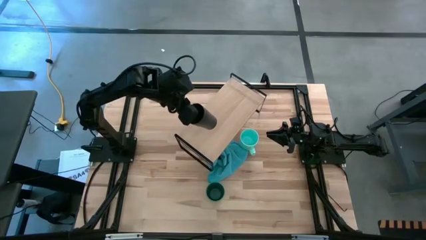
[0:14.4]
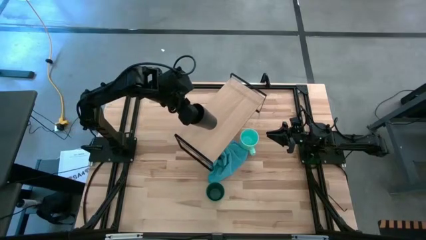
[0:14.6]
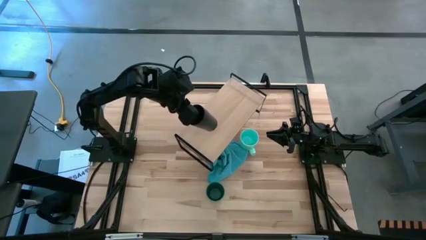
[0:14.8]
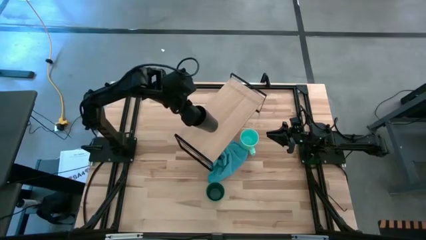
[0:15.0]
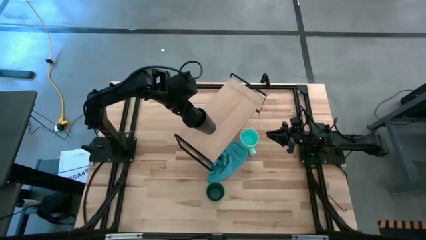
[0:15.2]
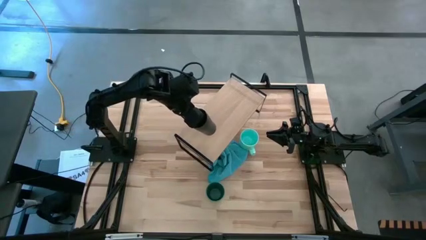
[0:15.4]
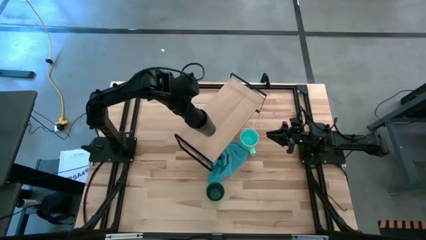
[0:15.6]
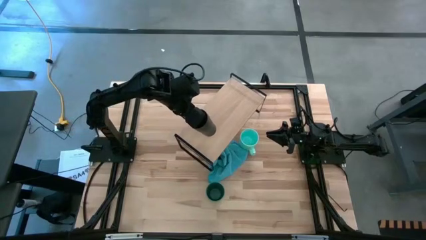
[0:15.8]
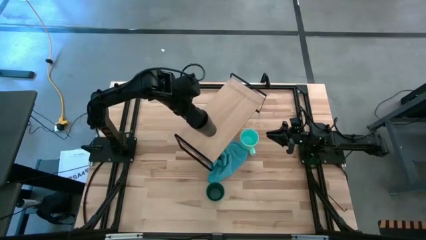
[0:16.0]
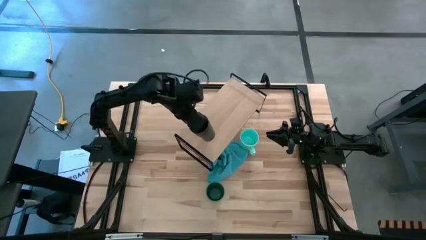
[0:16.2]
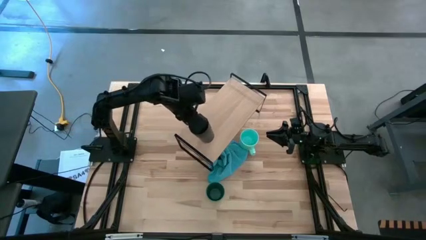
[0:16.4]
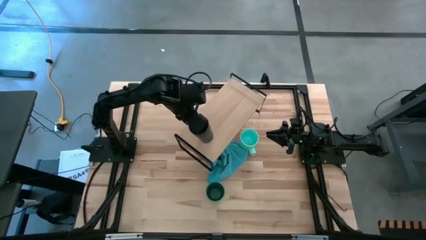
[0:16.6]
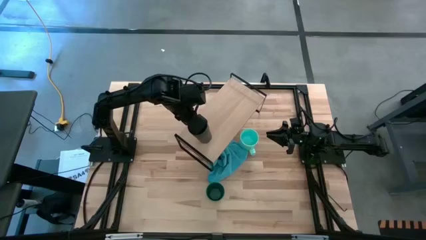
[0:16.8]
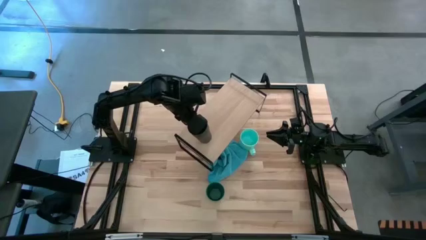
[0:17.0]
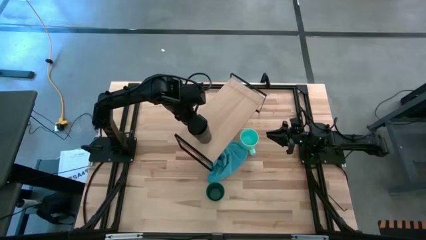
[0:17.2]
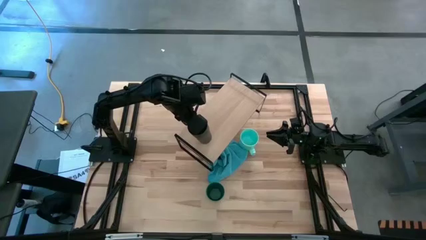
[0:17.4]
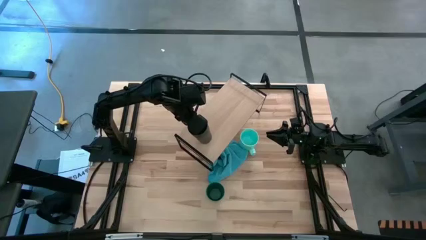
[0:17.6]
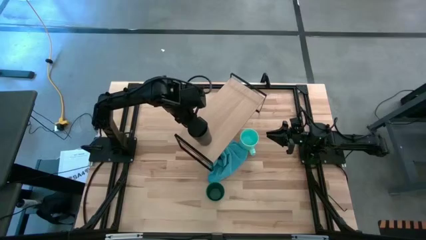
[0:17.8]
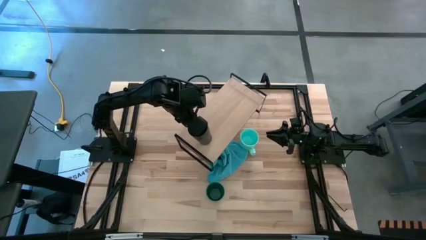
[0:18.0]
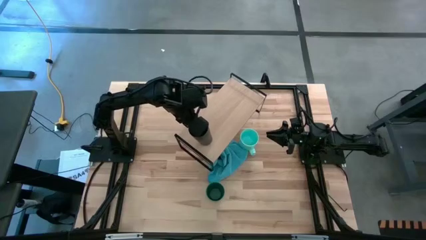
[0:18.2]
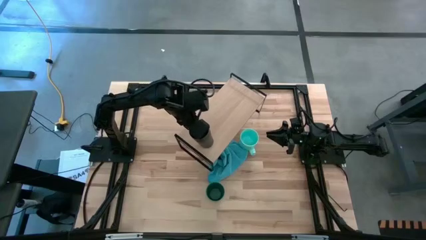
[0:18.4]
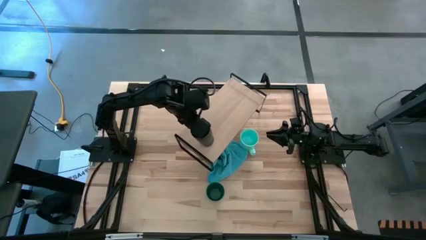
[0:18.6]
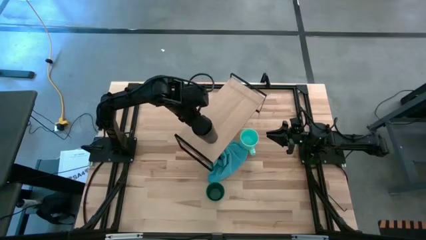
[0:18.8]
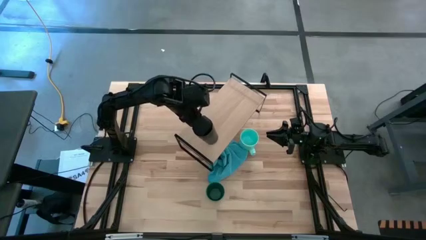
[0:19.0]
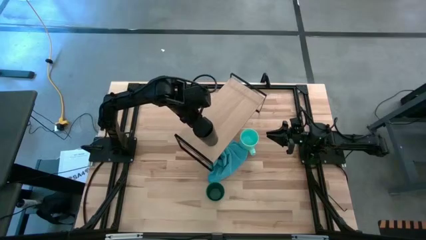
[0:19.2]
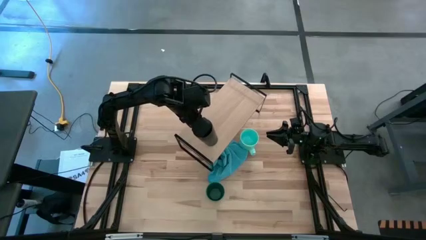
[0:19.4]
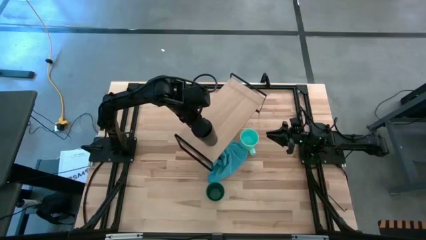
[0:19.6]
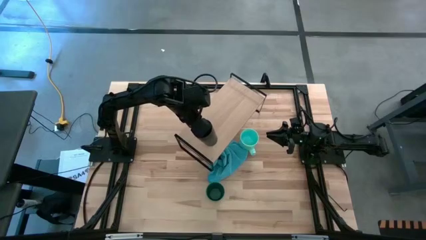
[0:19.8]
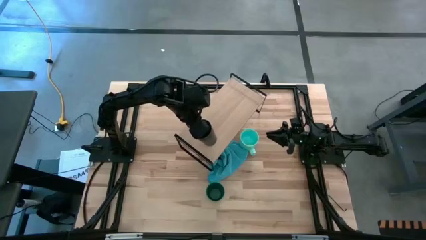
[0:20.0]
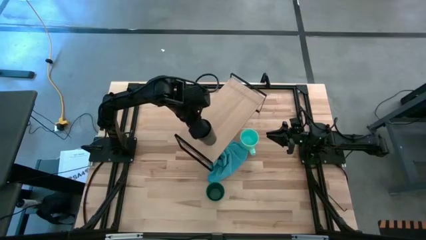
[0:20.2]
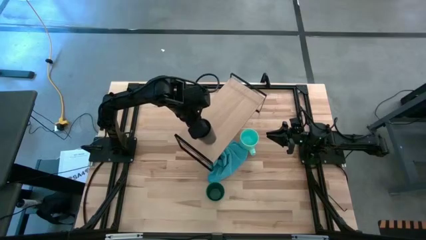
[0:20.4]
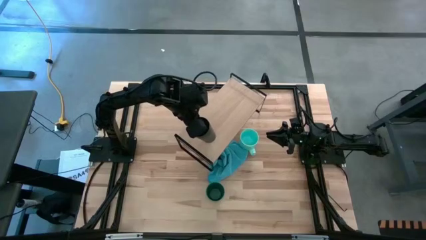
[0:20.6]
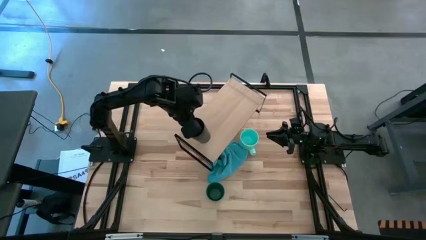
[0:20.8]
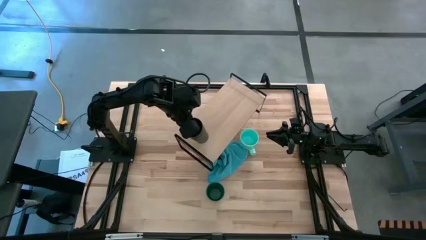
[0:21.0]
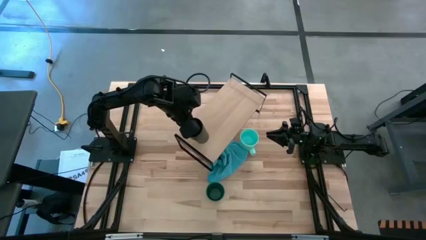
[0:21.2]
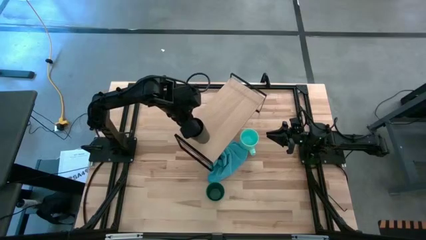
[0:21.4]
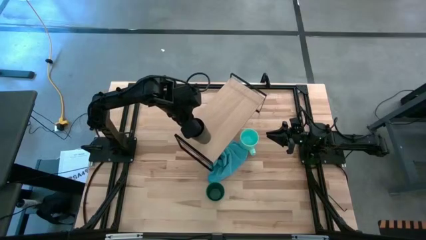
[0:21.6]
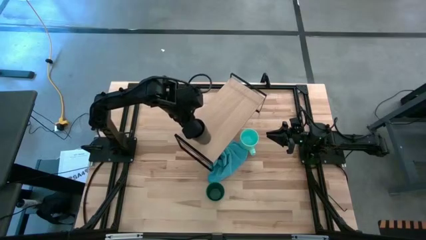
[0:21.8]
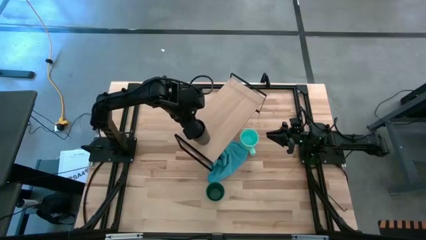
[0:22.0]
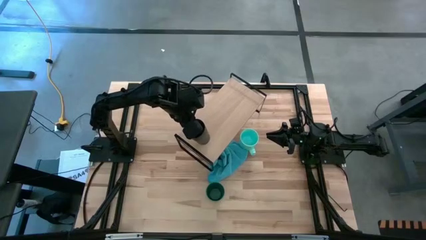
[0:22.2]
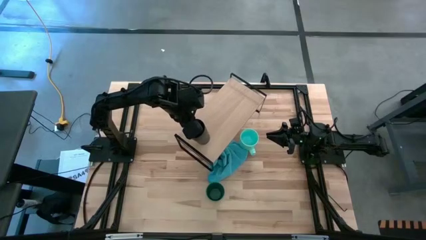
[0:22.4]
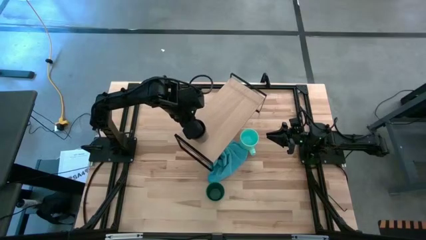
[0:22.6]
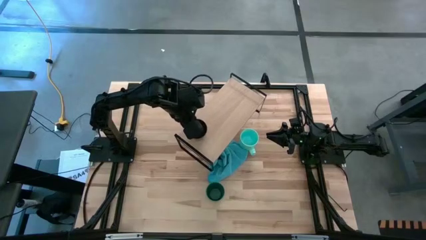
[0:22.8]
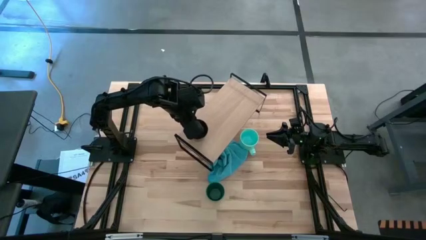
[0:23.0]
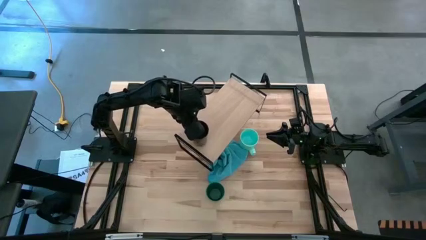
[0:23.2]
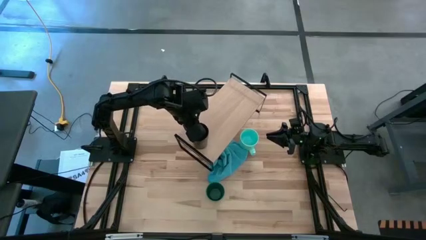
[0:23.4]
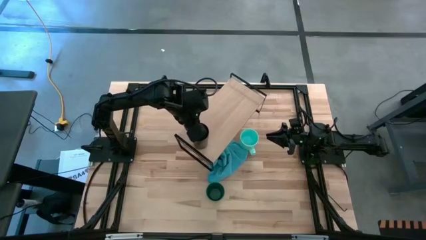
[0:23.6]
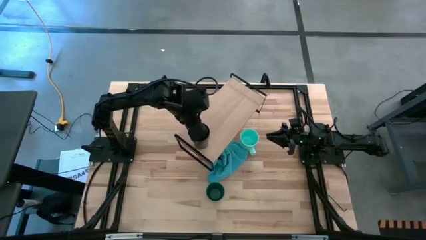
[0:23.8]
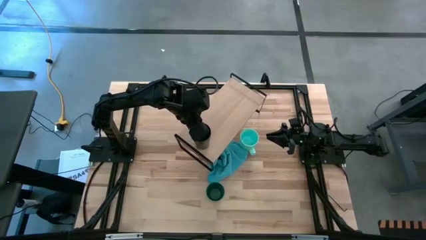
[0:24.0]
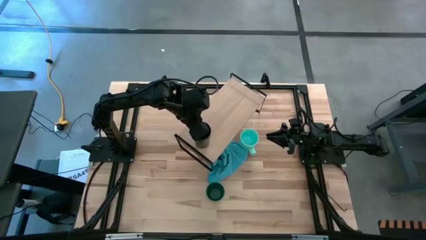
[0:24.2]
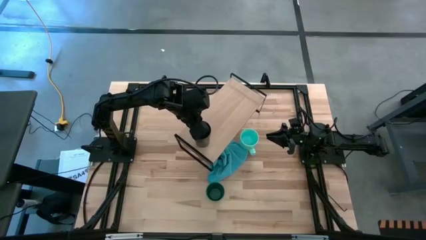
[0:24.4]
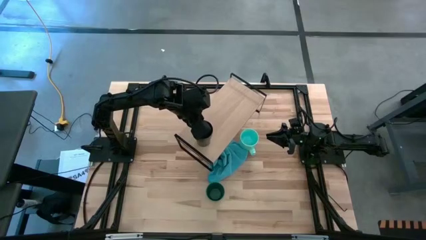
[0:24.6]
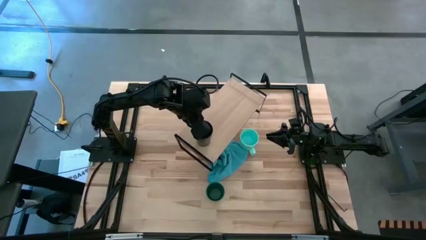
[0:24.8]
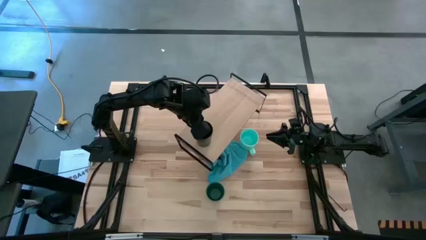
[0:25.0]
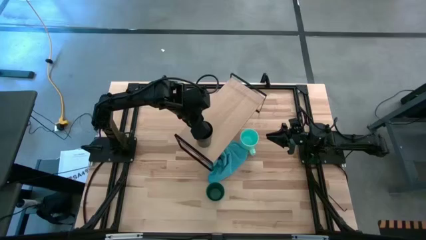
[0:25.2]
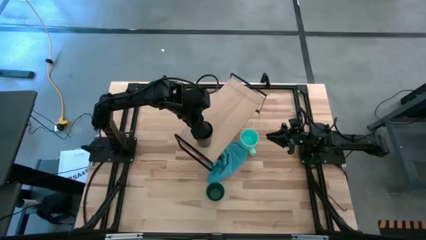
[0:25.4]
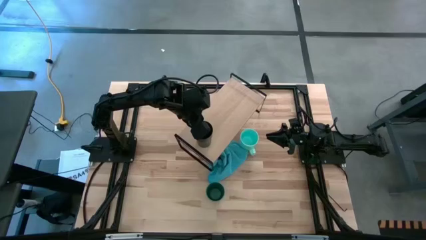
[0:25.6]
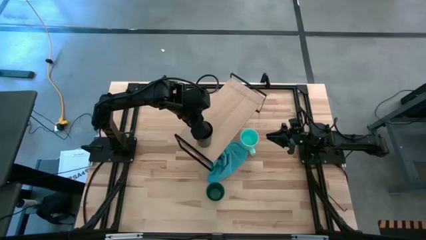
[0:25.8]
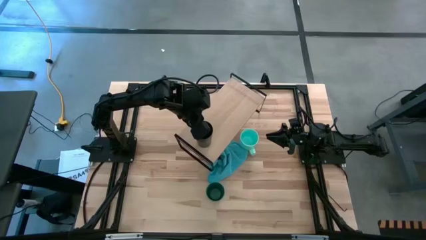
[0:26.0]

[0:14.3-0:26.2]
Task: Stack small to large cups/mugs on shelf
Put the black cup on the shelf

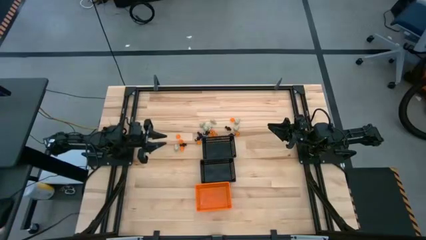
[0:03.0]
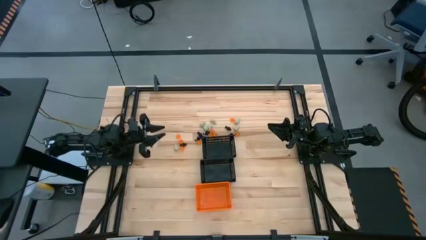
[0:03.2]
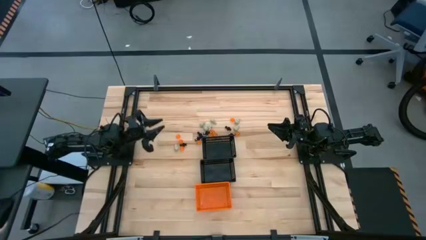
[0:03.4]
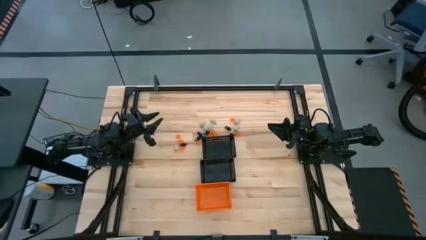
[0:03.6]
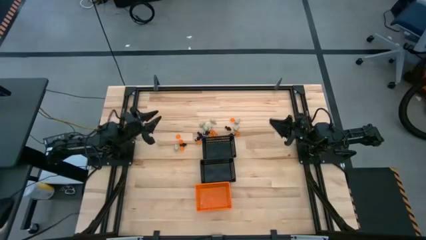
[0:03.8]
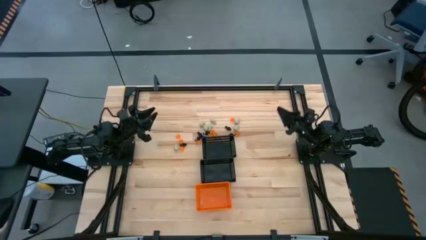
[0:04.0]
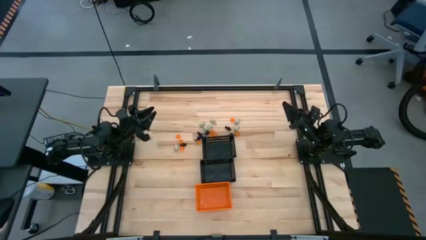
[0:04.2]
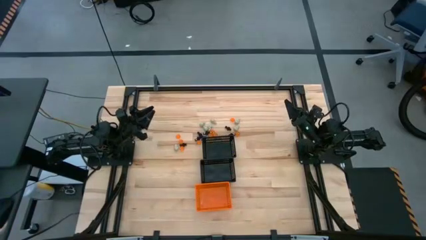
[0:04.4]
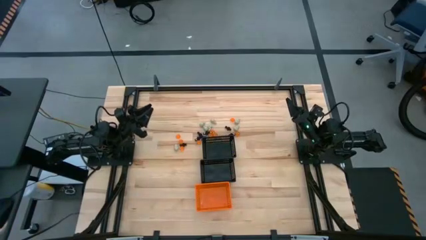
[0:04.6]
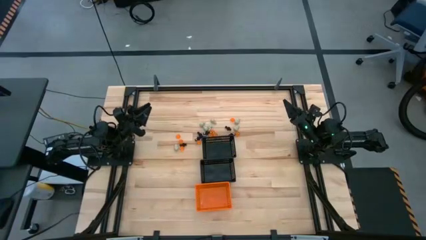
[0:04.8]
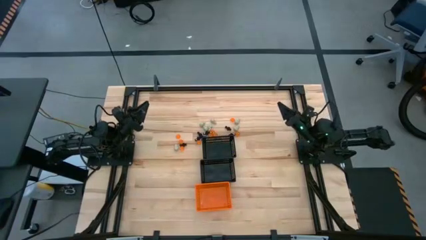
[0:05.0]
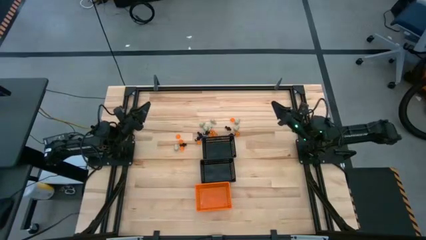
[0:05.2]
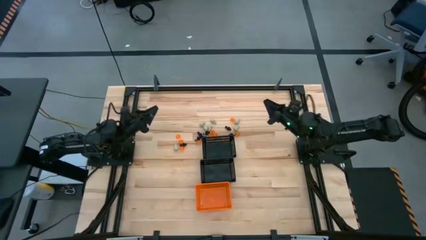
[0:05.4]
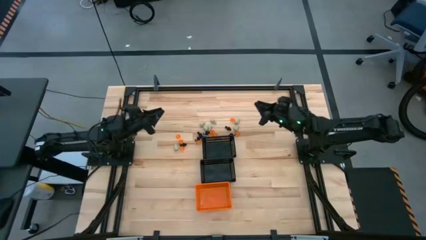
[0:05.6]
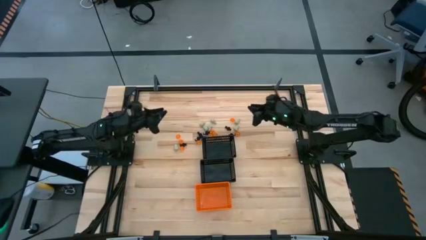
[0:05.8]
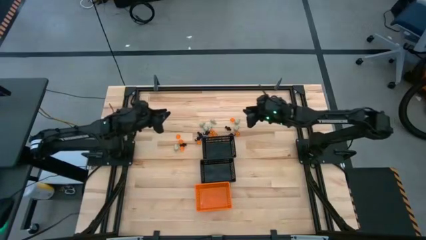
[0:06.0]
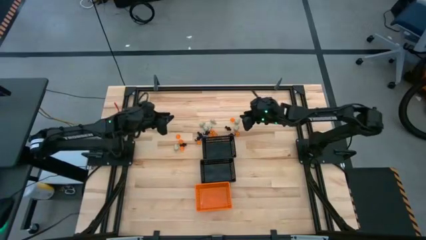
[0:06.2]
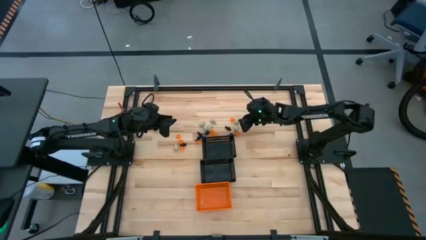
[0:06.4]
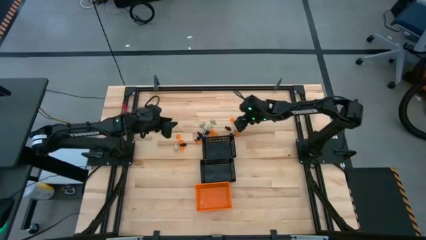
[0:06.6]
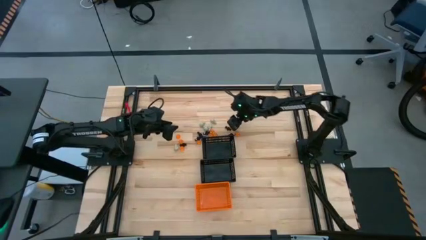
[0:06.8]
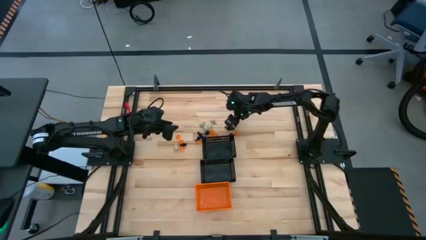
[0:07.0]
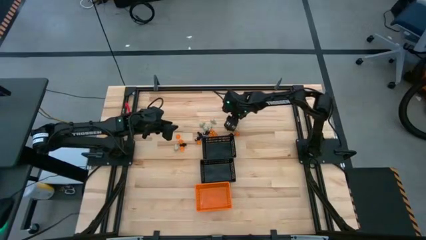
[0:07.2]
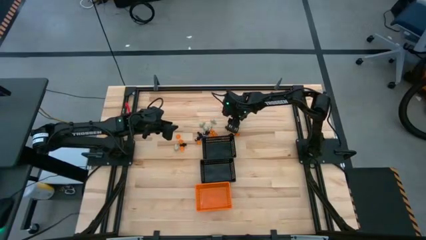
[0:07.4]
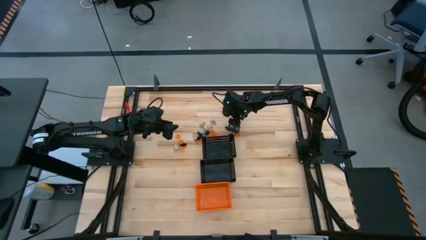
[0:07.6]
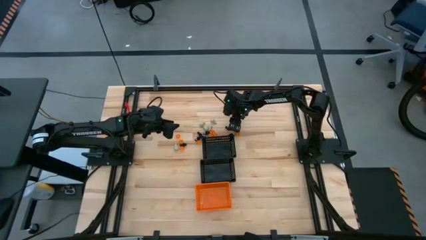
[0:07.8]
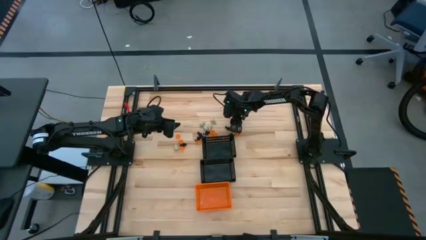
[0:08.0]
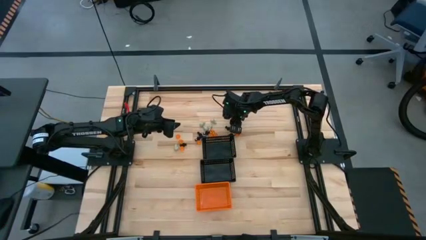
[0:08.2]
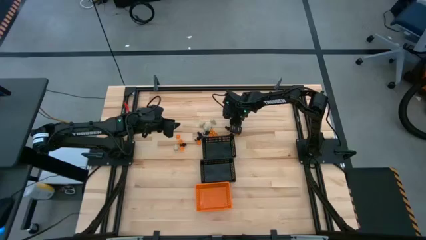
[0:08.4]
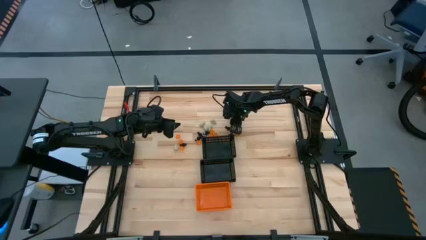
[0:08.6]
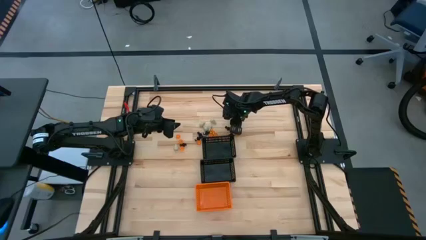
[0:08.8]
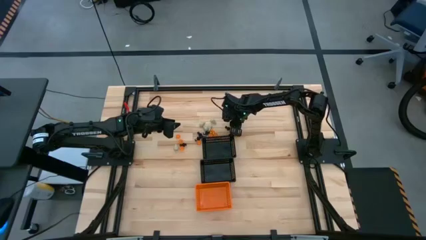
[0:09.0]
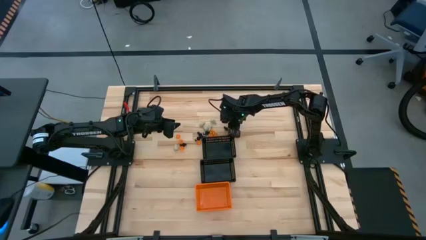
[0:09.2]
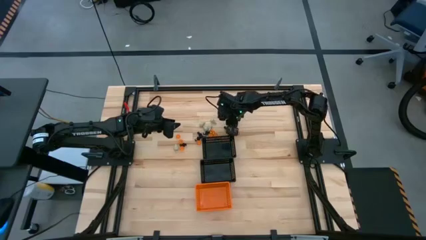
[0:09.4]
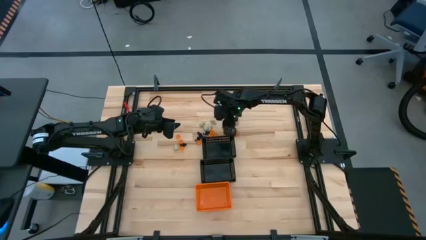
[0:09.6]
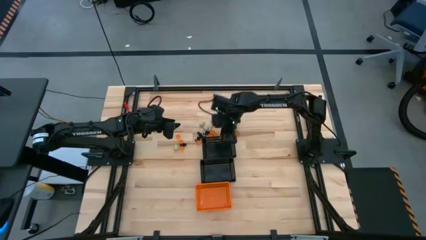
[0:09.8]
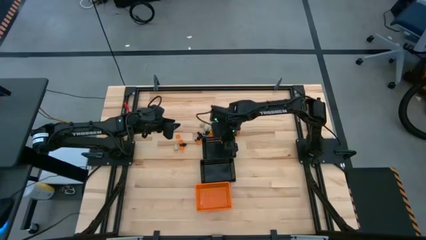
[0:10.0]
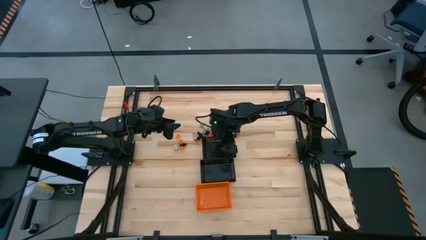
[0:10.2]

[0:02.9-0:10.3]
Task: Sort Halloween decoration
Put the orange pumpkin toy into the top black bin
